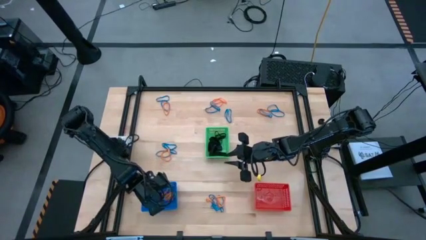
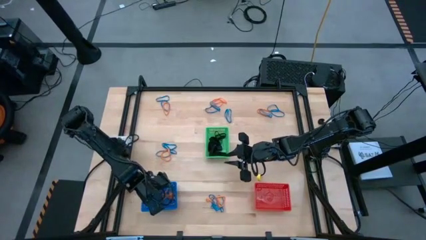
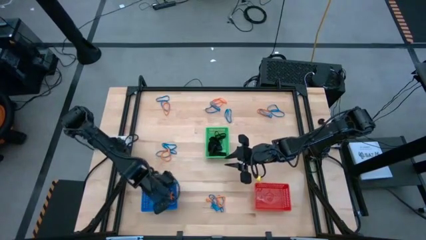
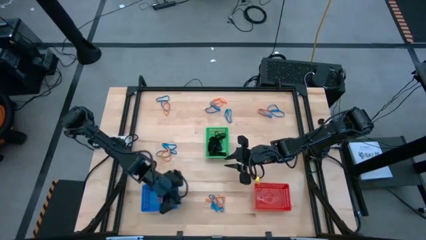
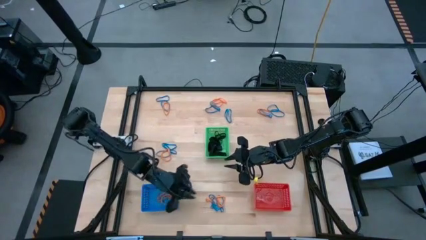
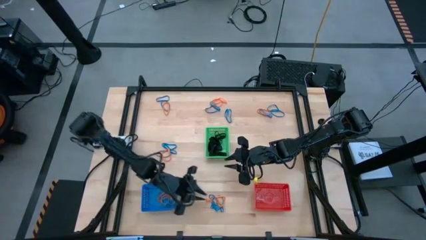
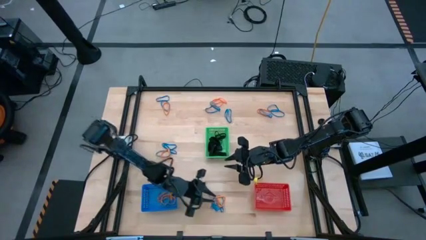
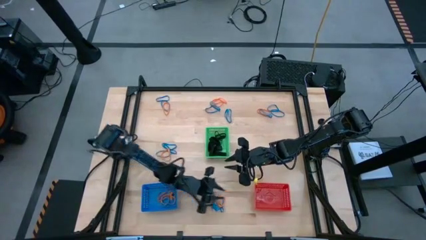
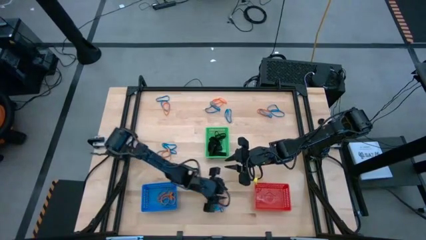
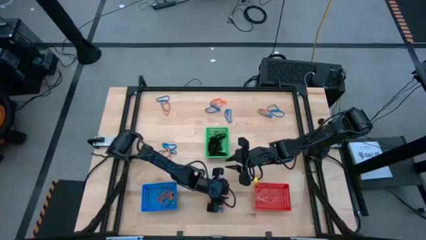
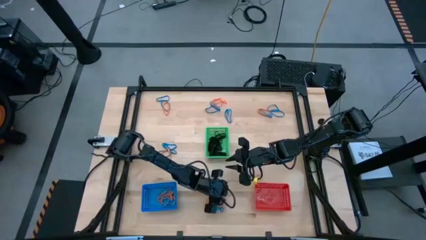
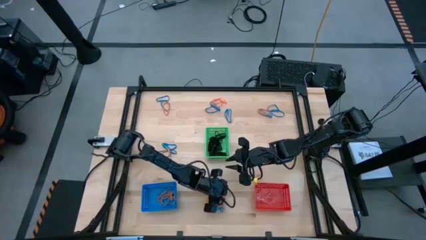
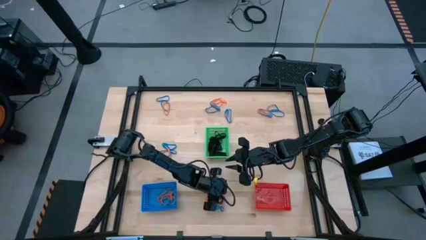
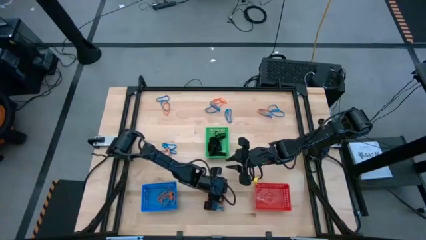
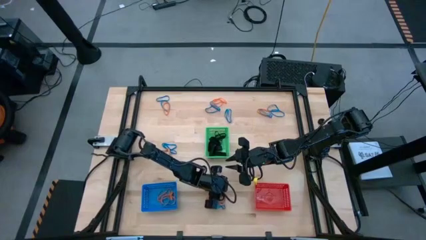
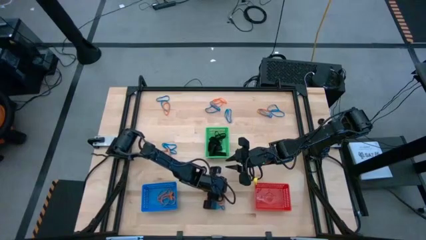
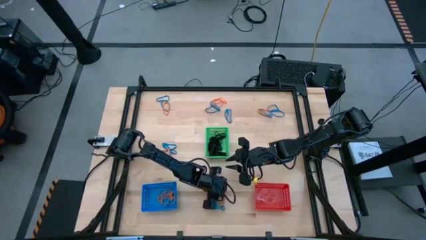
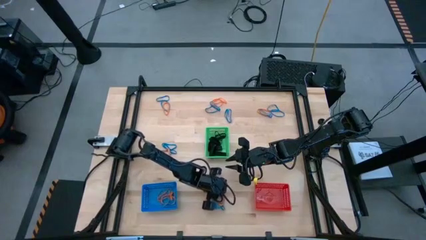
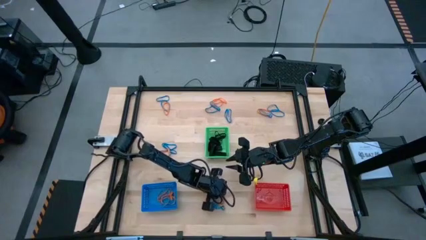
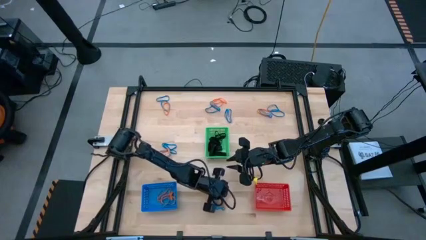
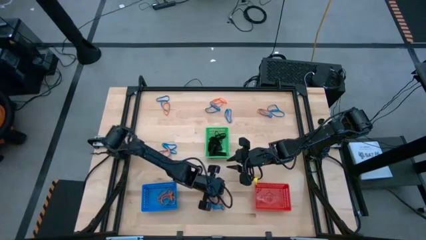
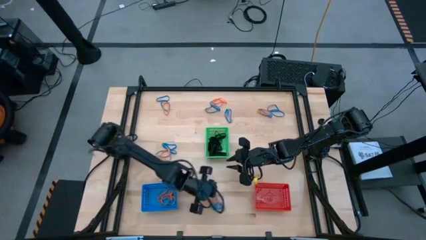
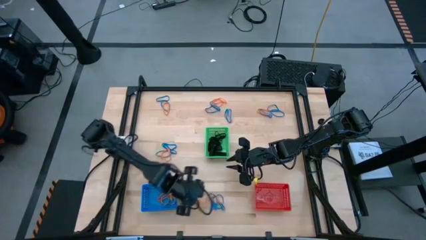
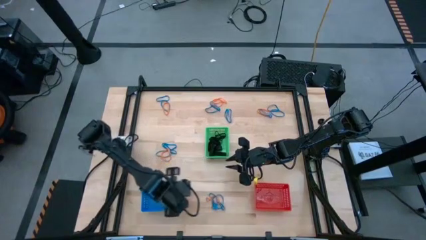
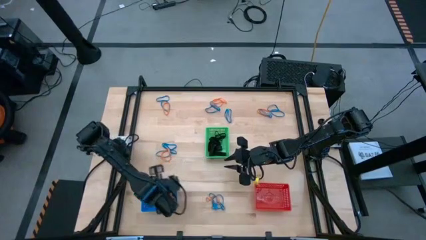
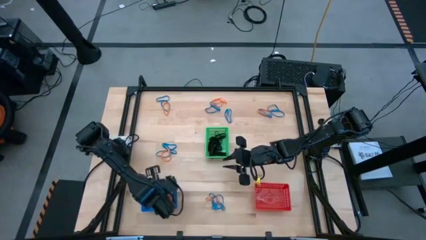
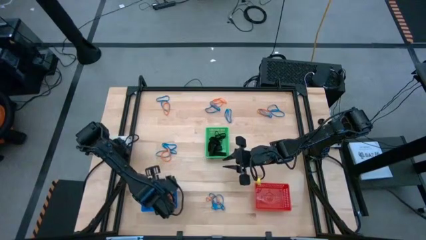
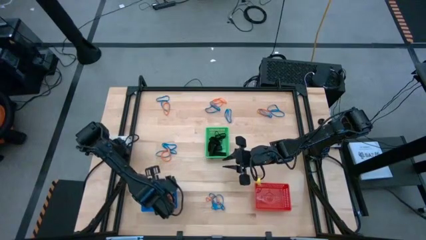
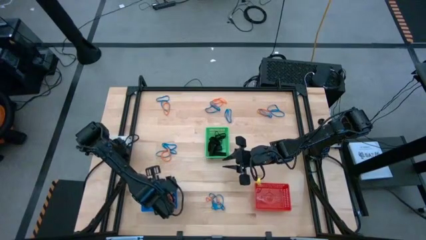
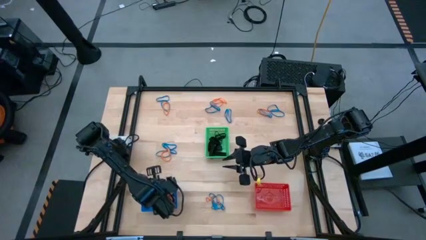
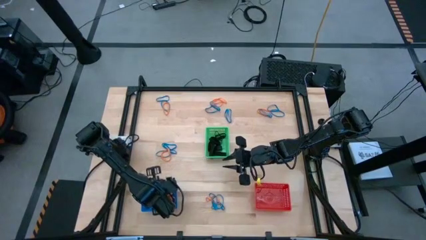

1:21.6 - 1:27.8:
Task: Sort rubber bands into baskets
Put the orange rubber band into the blue bin

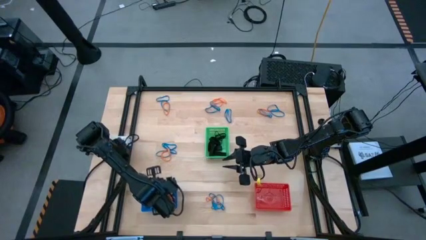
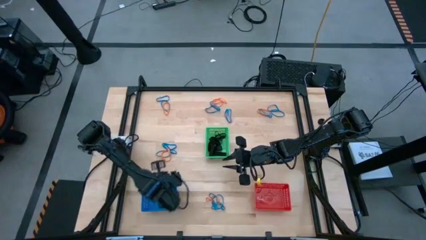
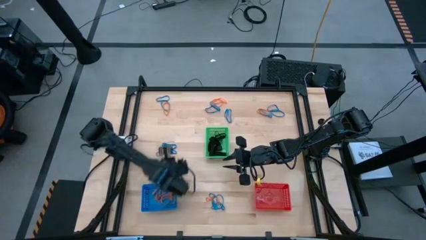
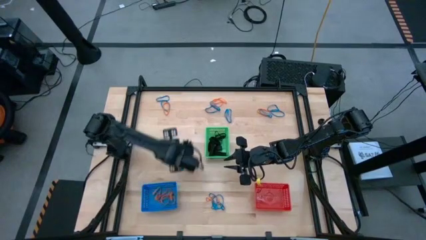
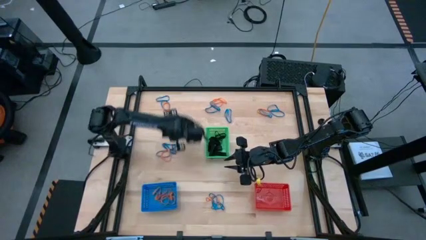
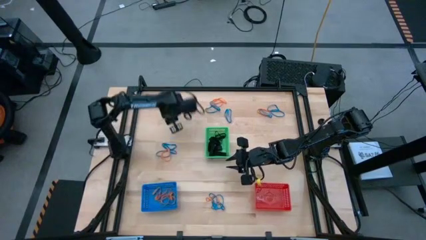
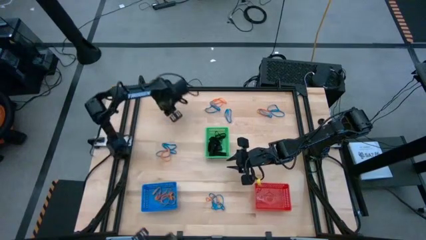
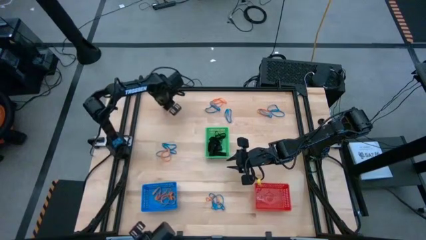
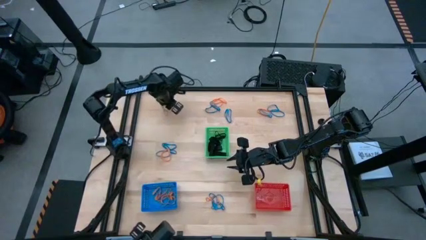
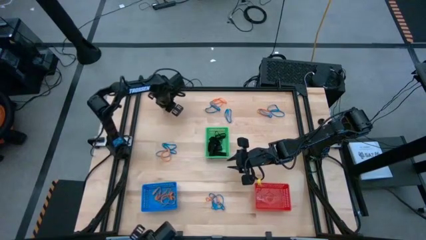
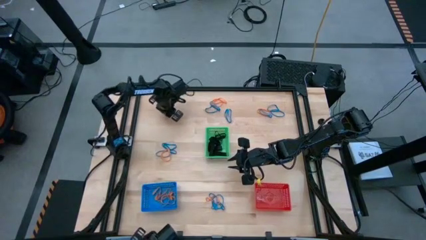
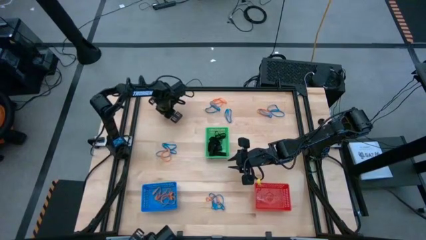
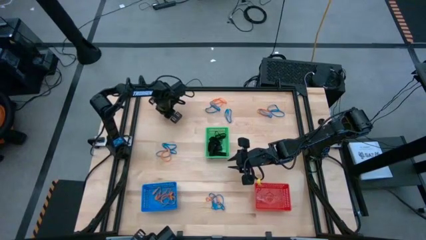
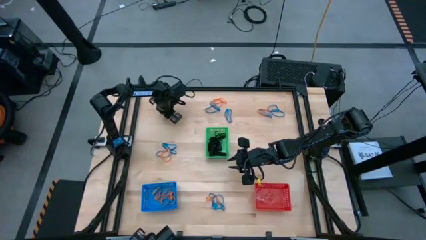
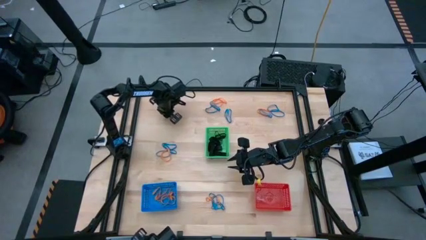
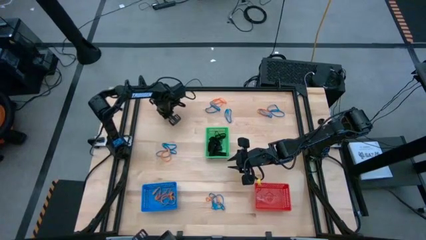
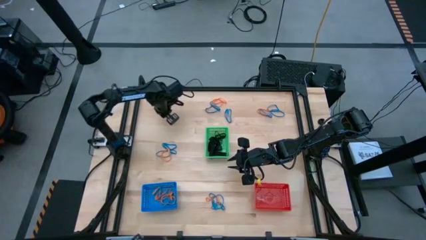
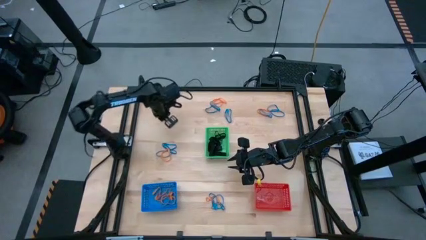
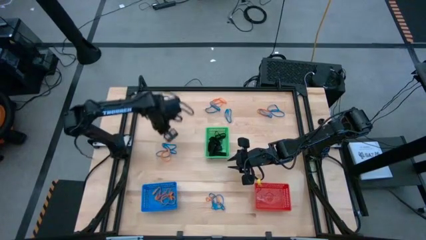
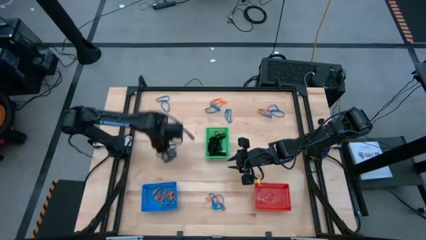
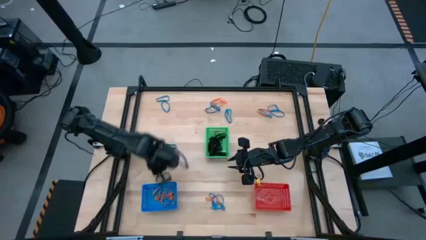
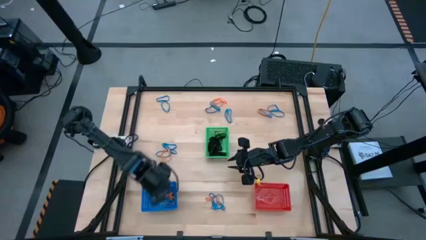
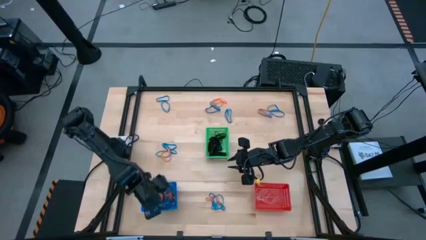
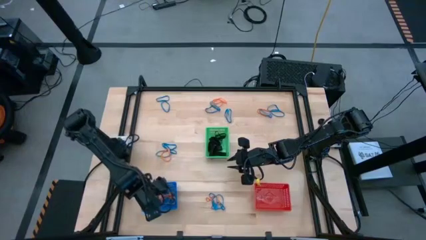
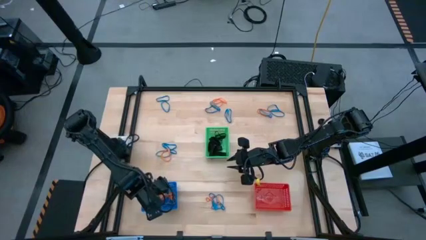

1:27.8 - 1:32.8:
Put the orange rubber band into the blue bin

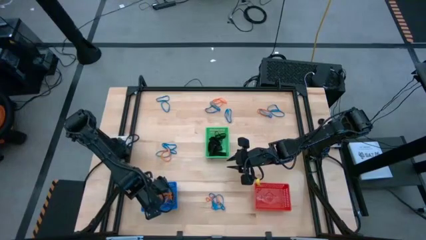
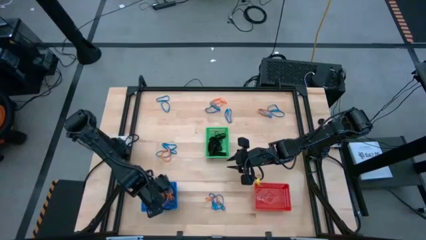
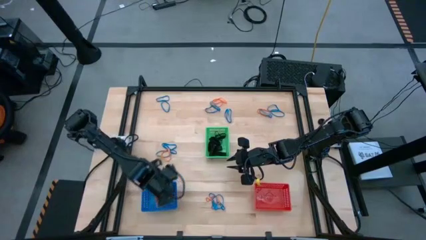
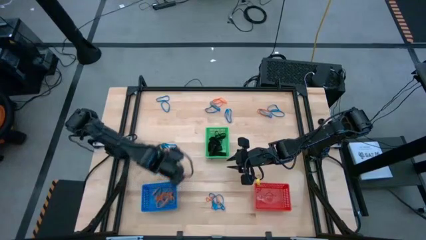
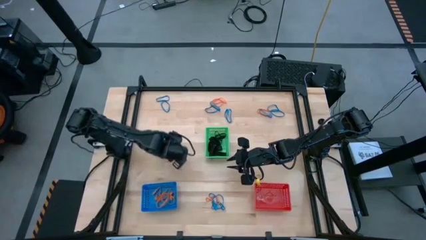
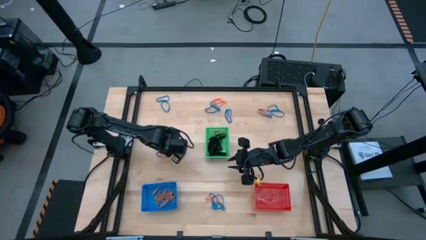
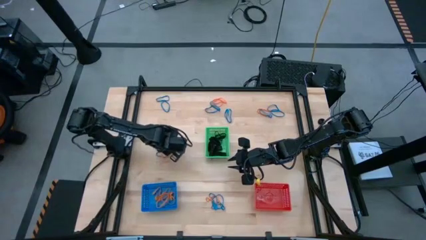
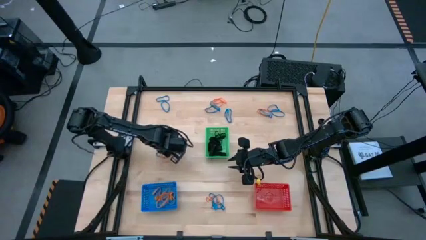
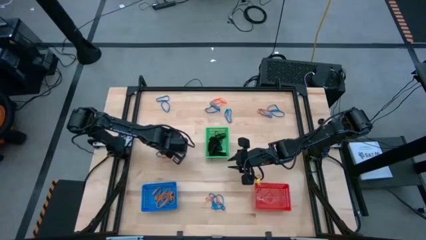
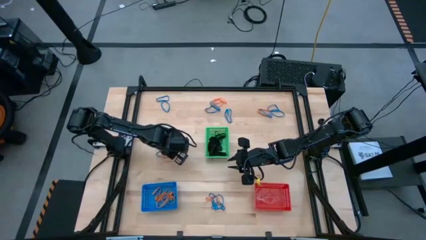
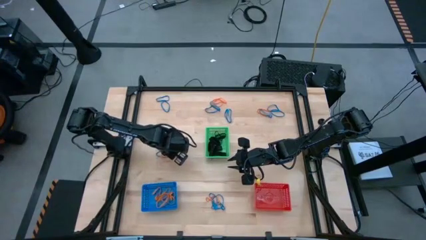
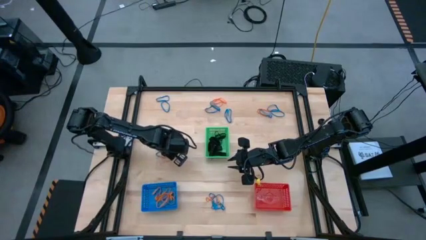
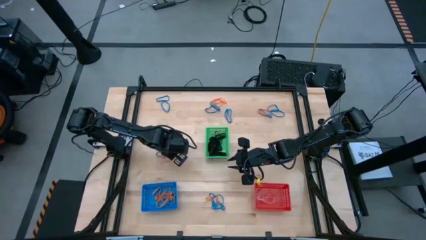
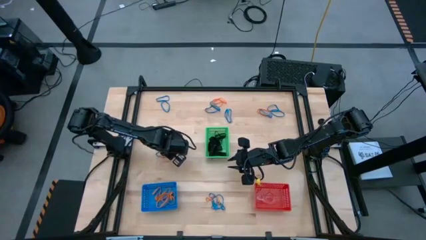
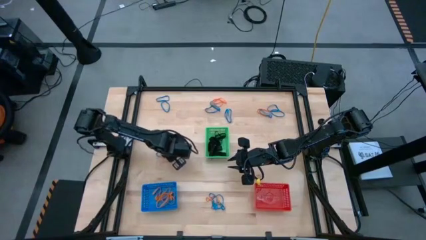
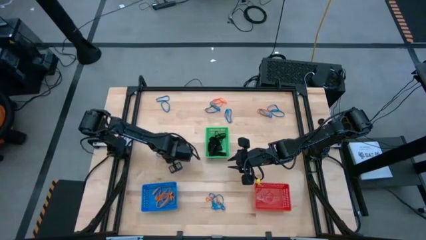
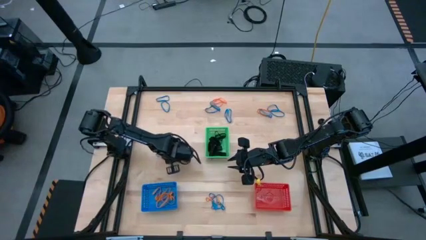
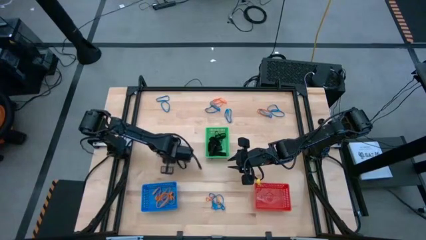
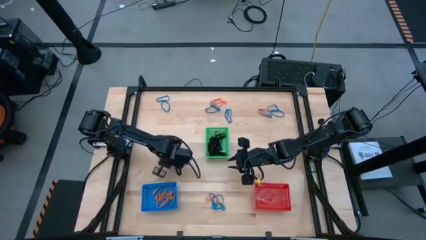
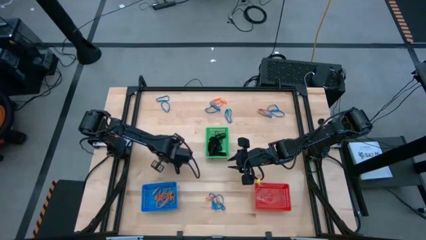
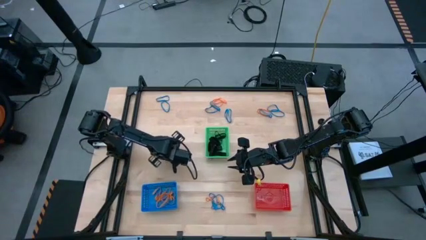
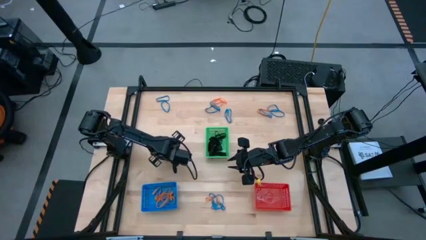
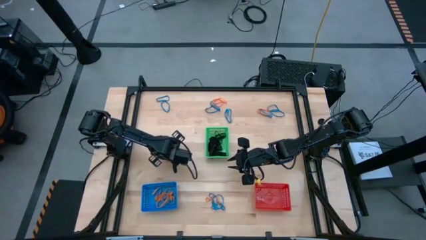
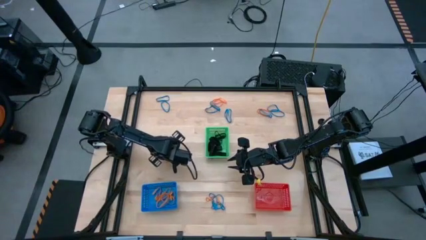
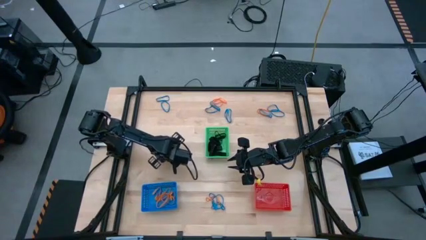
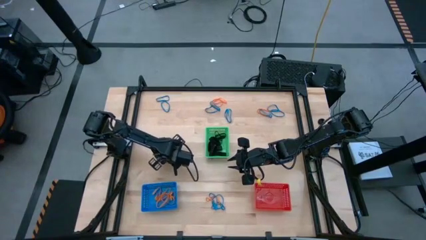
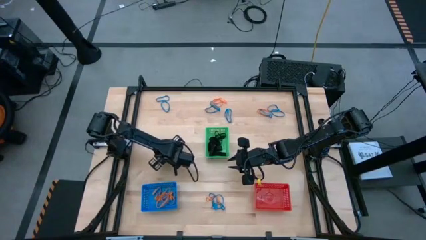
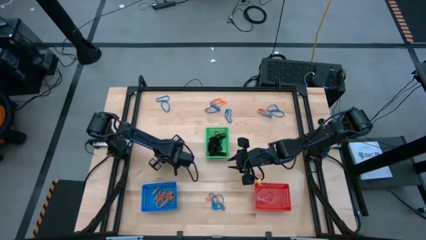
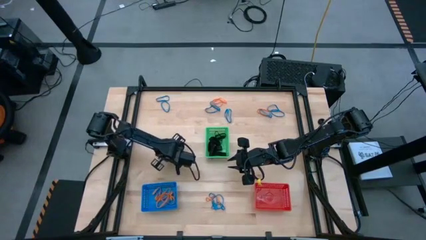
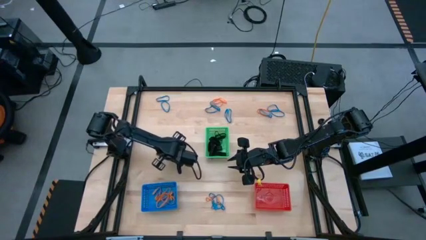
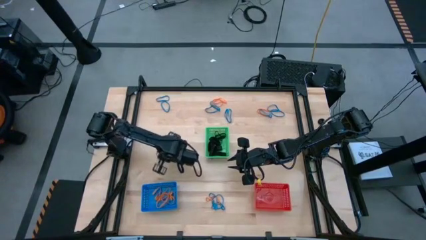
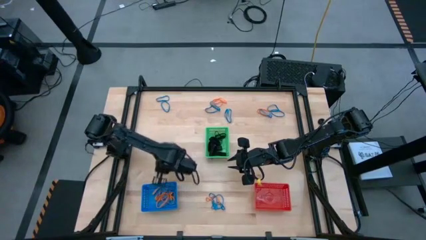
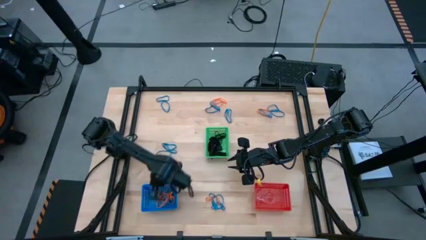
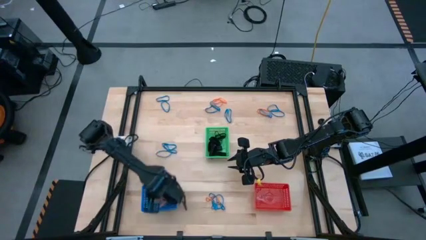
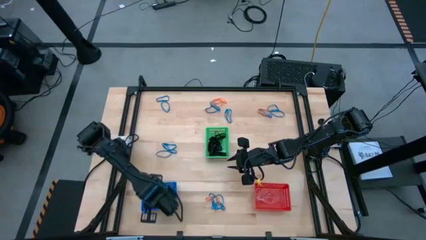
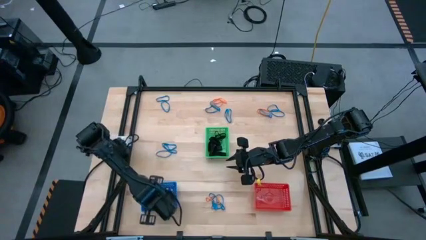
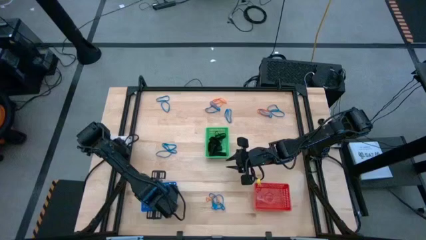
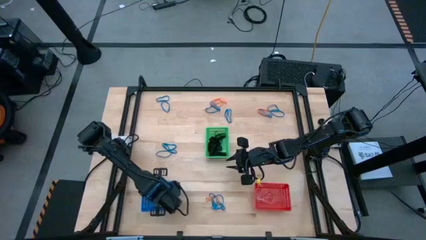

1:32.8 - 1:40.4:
Put the orange rubber band into the blue bin
